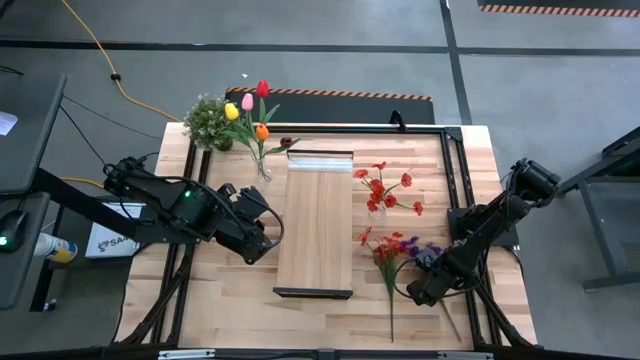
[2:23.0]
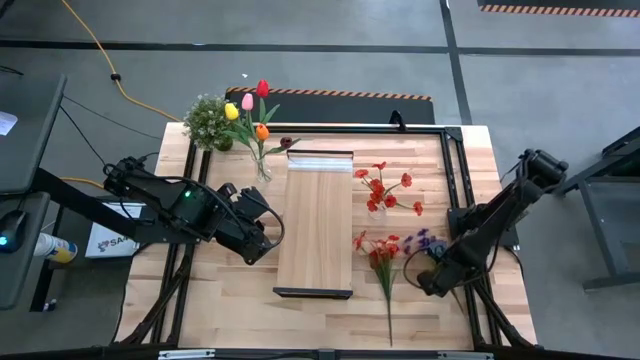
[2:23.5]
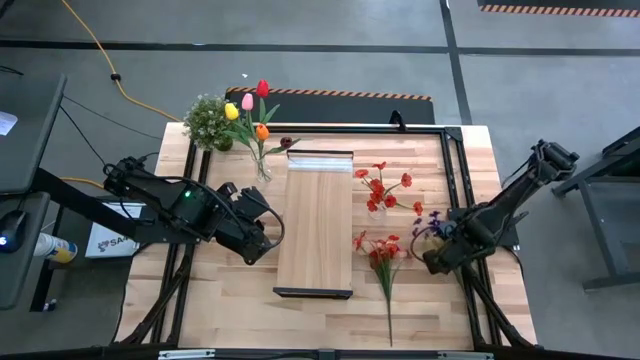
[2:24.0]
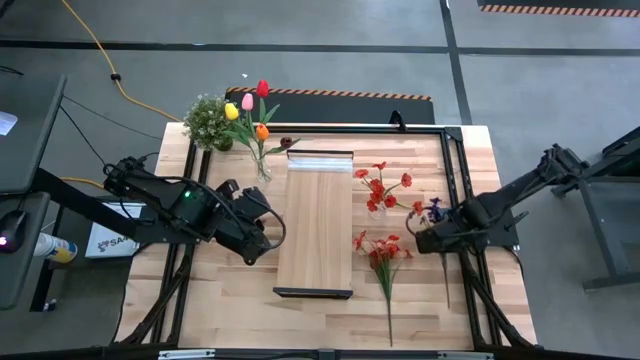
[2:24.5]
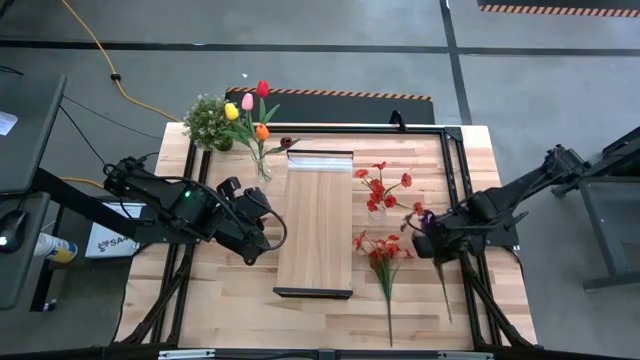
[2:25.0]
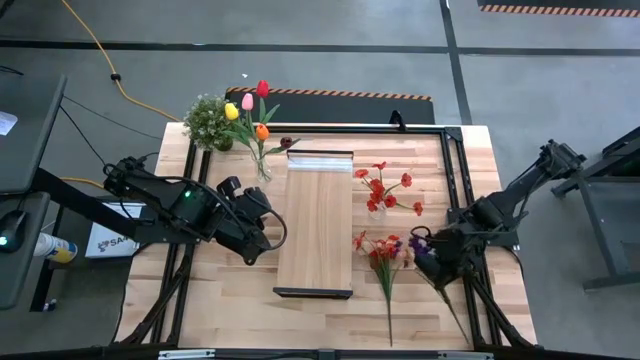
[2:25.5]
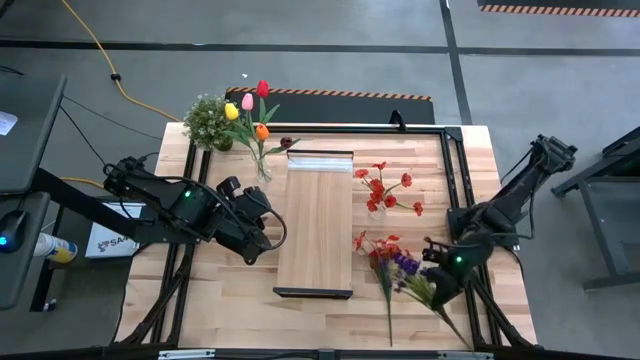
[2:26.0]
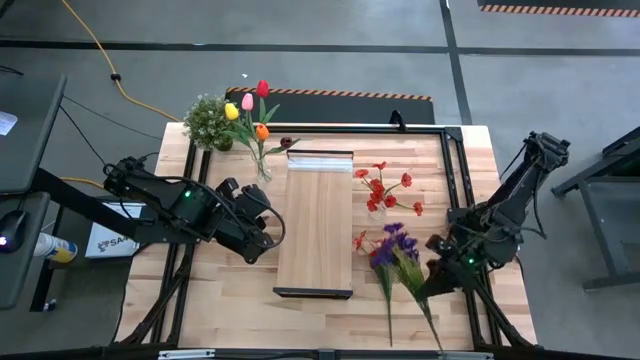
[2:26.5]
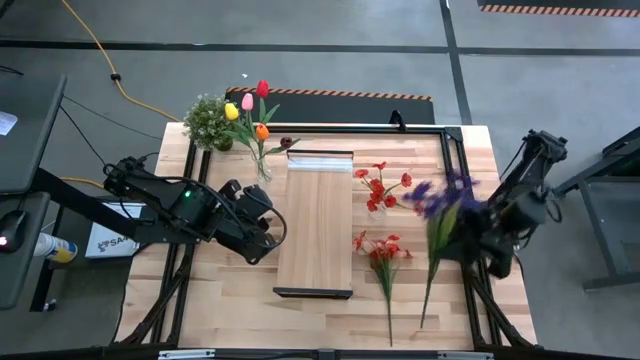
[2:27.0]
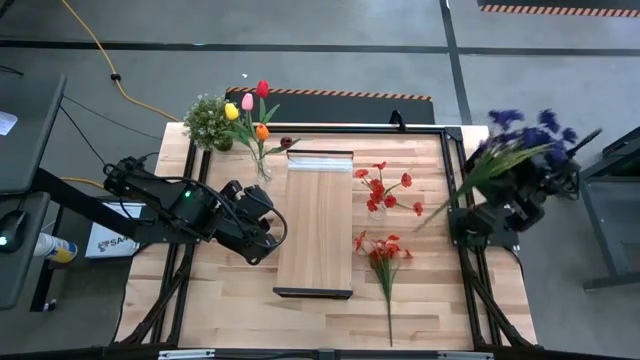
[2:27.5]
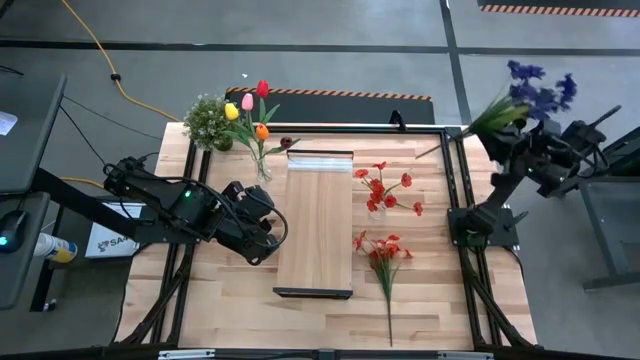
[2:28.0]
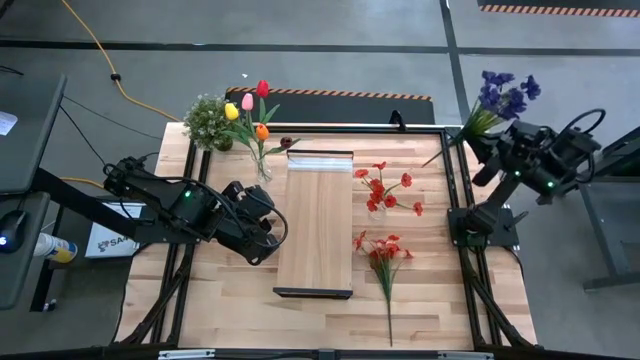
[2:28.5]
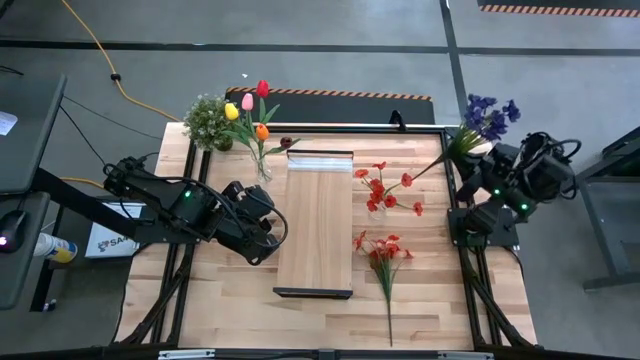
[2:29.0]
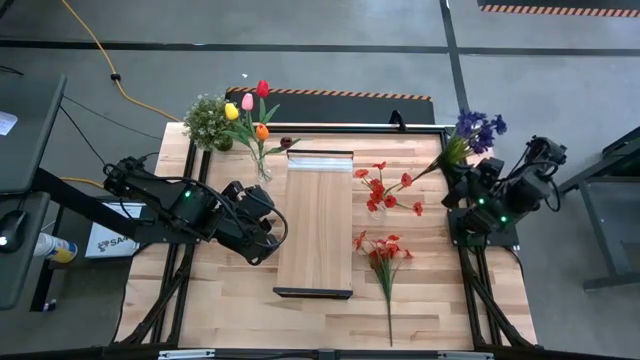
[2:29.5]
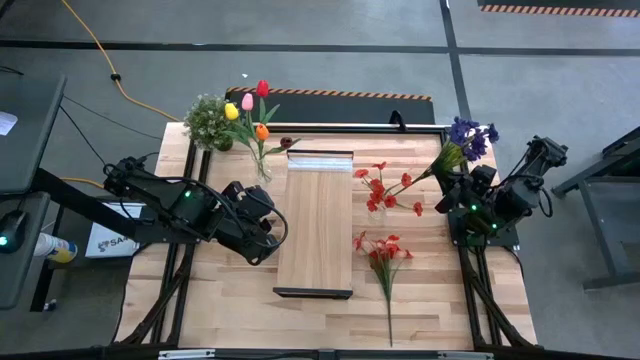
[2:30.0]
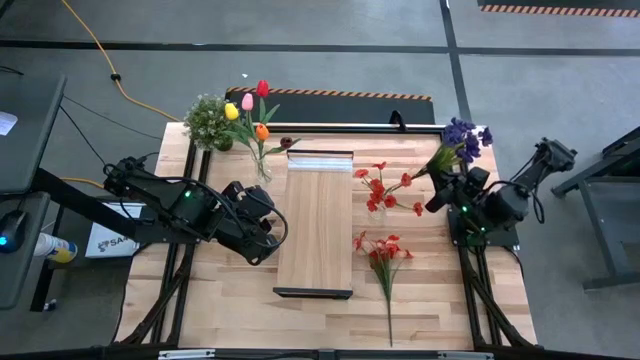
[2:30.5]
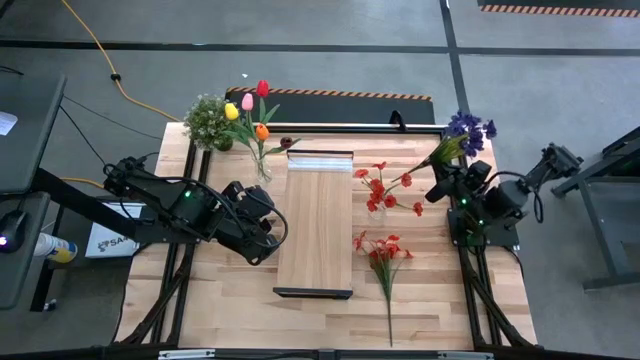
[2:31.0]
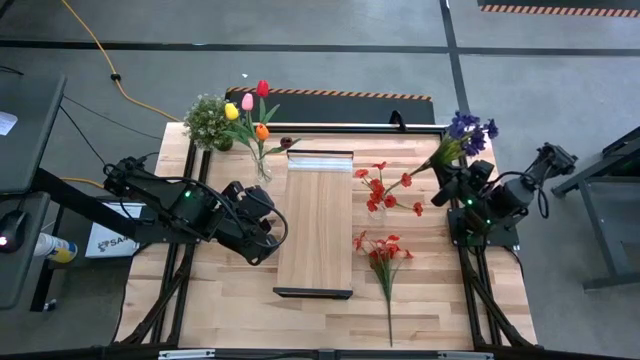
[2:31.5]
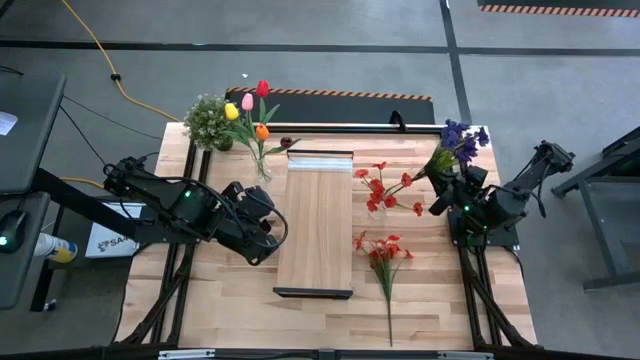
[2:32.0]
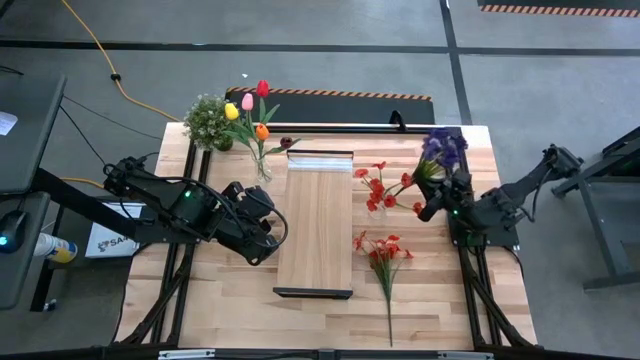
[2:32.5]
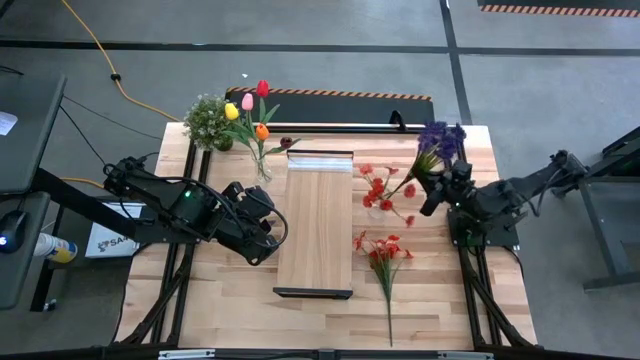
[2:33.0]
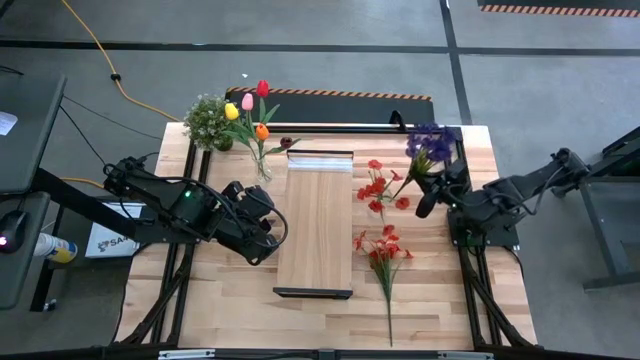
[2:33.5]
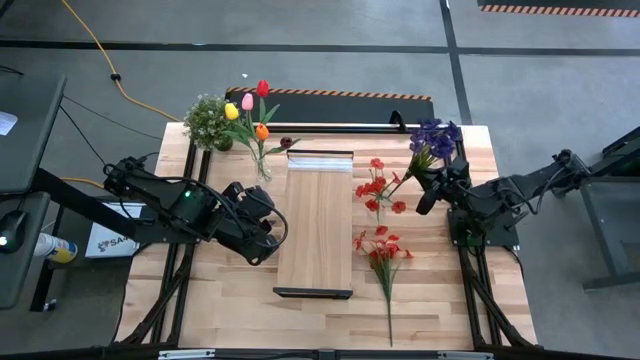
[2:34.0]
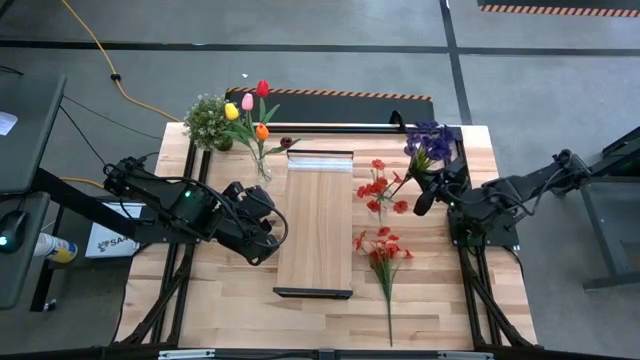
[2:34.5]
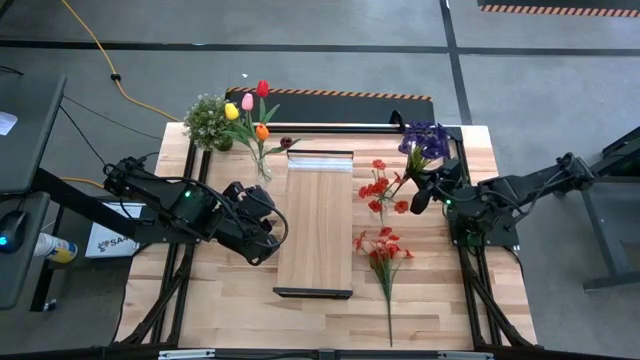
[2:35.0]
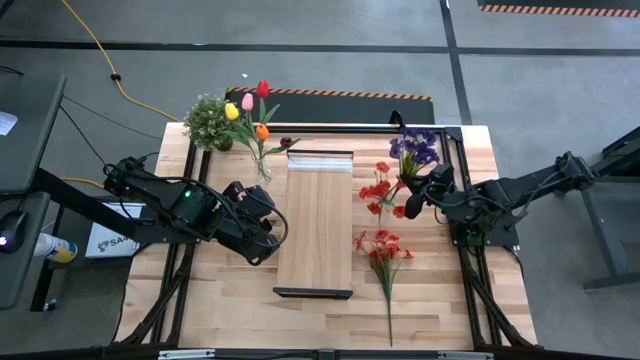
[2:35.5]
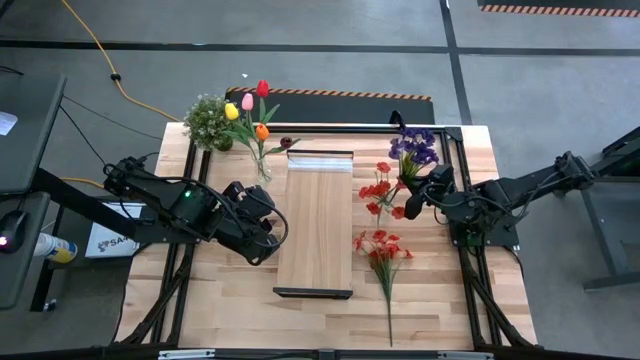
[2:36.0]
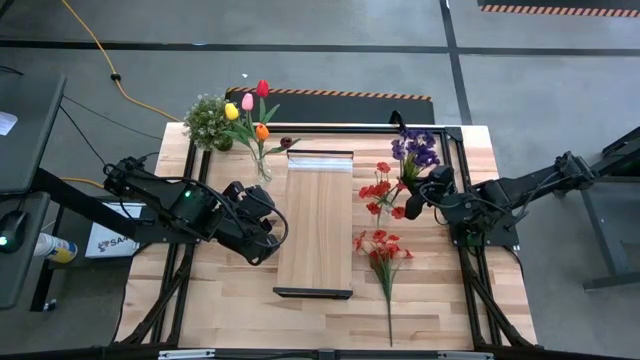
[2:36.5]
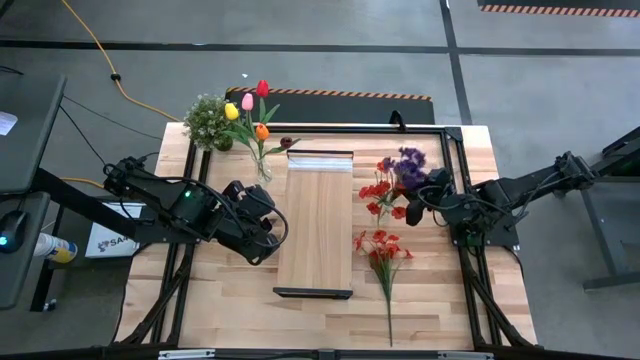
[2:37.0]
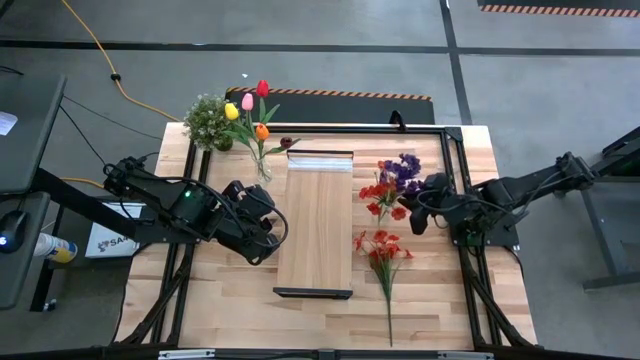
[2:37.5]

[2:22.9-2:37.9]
Task: Pick and place flowers into a vace then onto a shelf
Put the purple flowers into the right vase

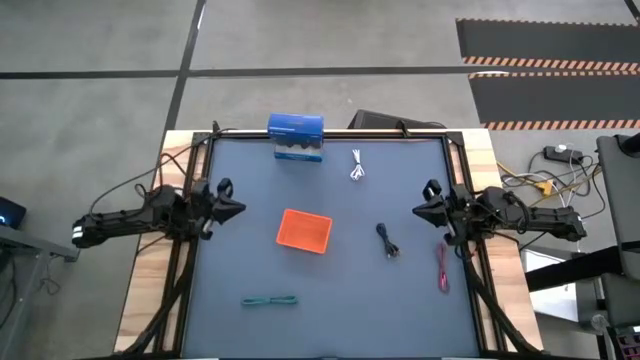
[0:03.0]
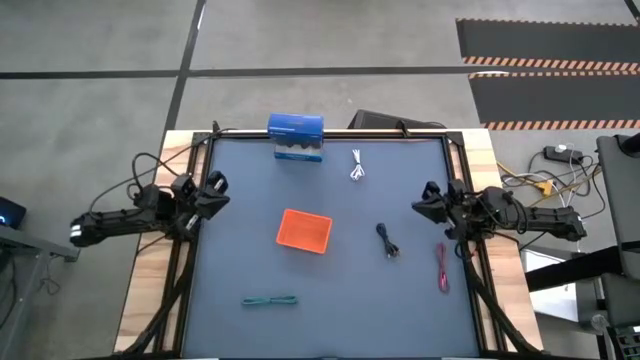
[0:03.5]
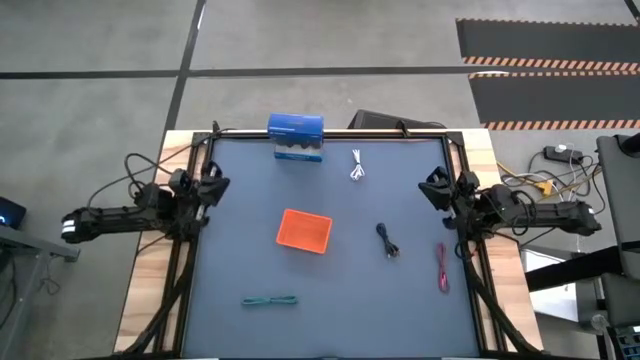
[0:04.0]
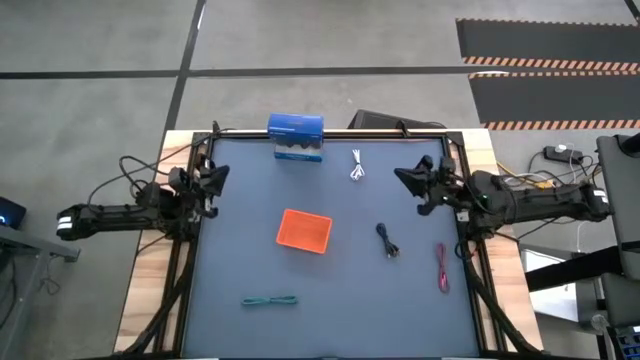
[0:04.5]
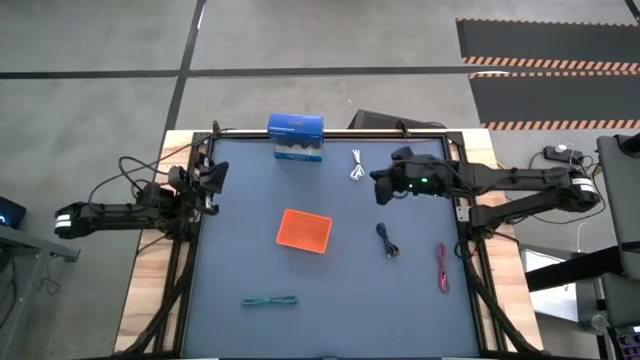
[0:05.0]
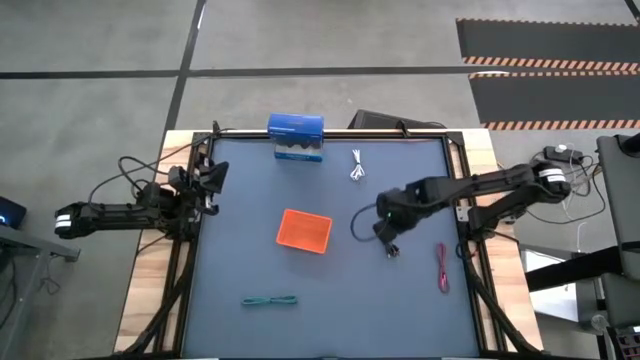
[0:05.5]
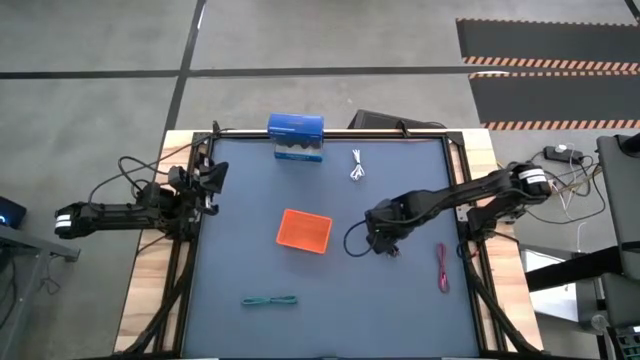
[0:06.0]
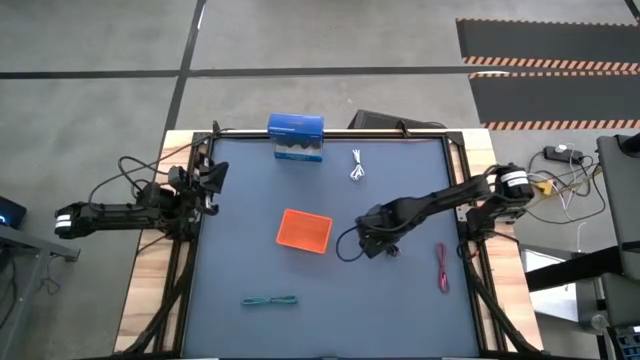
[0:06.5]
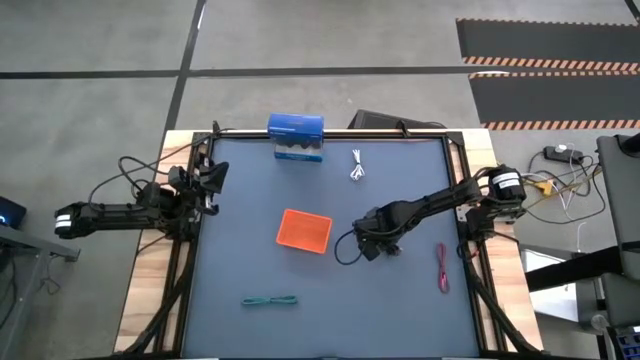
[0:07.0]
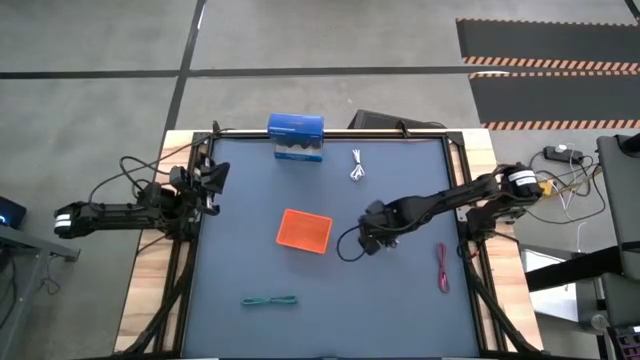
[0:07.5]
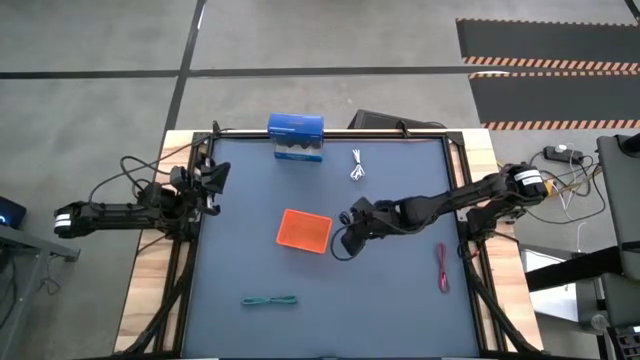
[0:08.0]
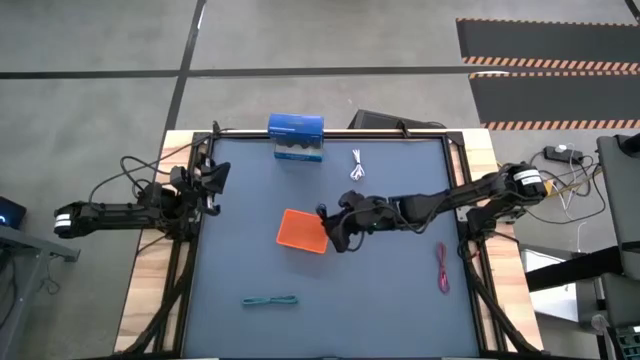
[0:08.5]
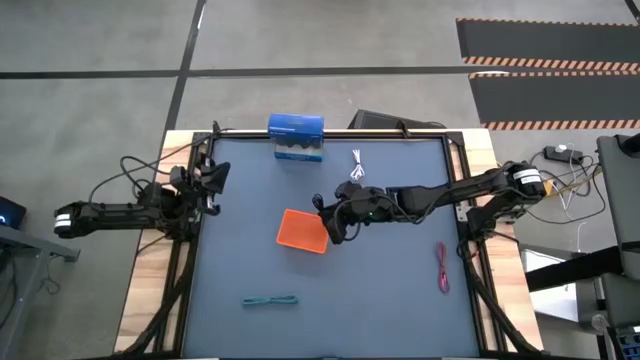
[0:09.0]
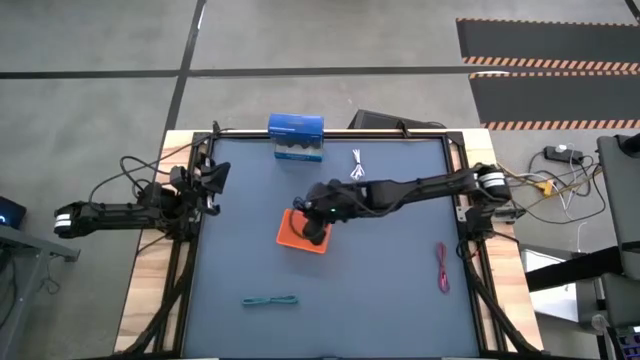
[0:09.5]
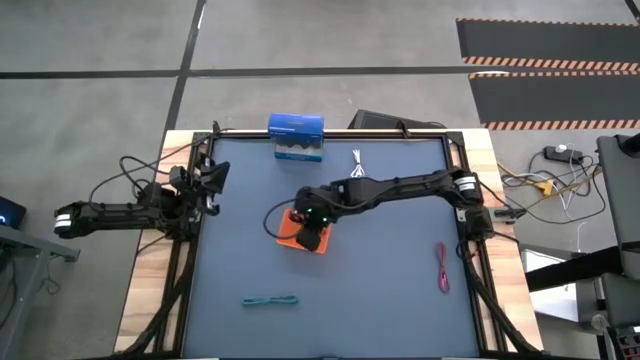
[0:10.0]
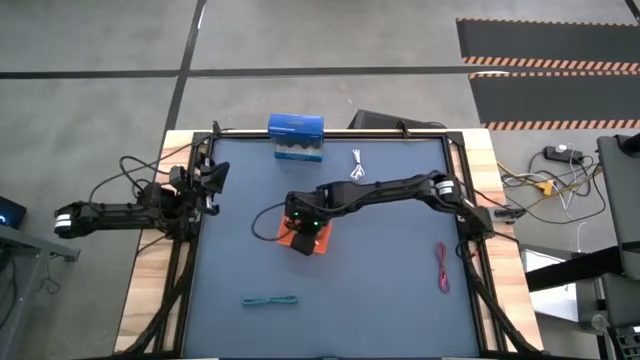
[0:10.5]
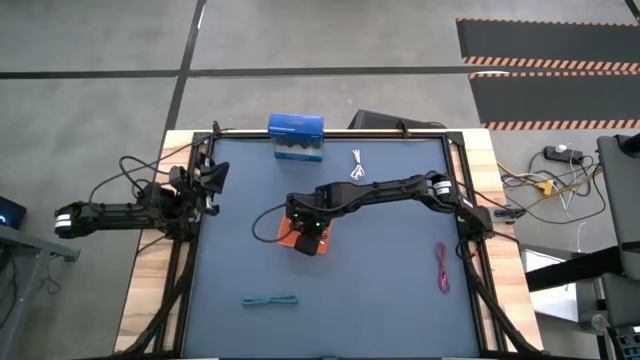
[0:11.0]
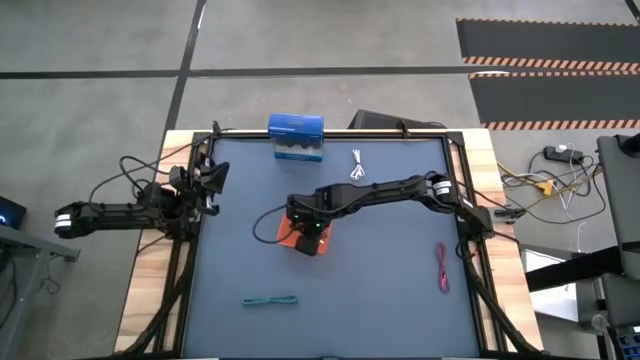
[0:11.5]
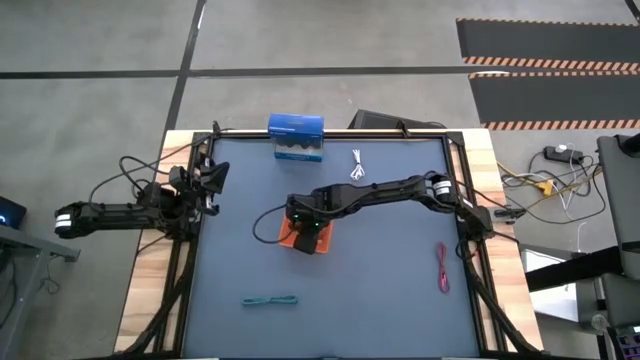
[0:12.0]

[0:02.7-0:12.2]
Task: Pick and place USB-C Cables
Put the black charger cable into the orange bin
